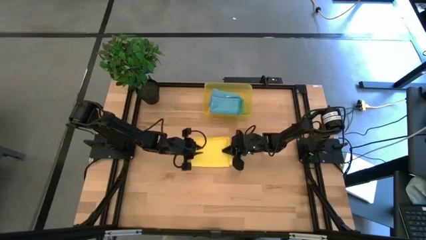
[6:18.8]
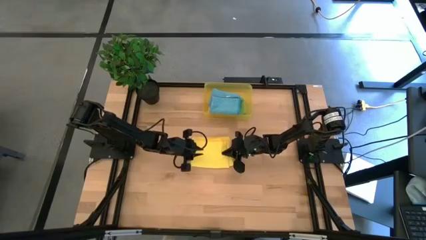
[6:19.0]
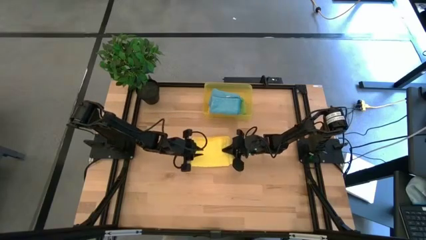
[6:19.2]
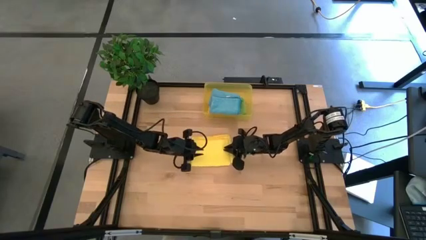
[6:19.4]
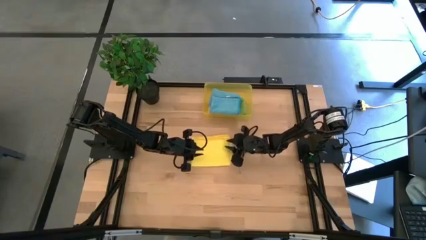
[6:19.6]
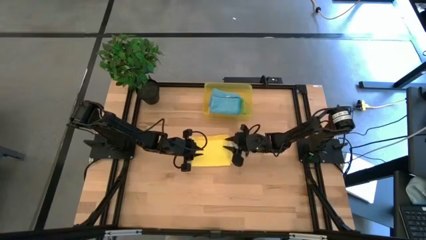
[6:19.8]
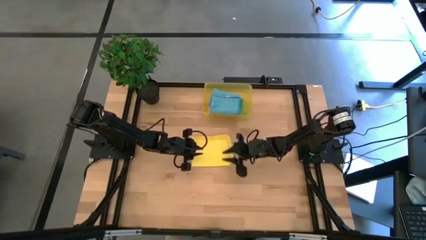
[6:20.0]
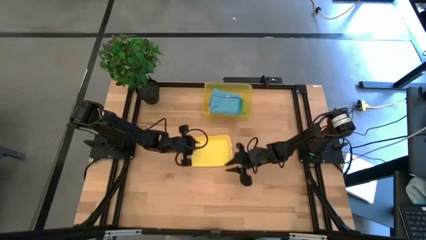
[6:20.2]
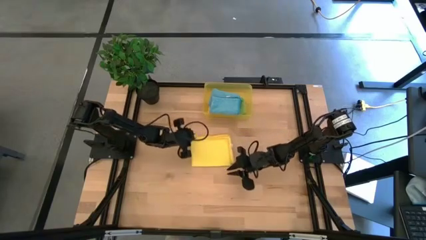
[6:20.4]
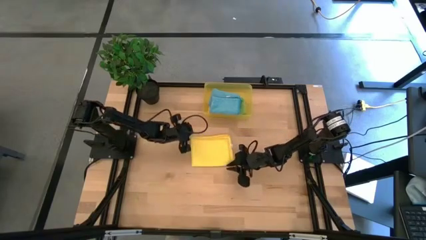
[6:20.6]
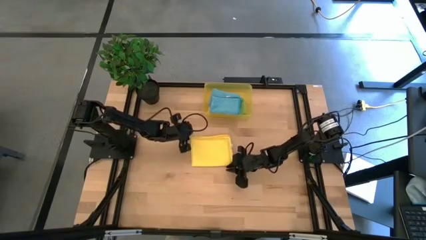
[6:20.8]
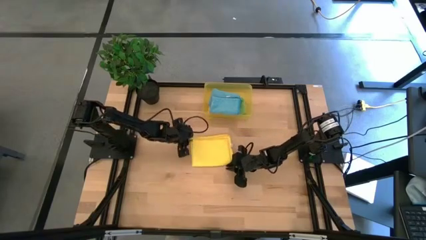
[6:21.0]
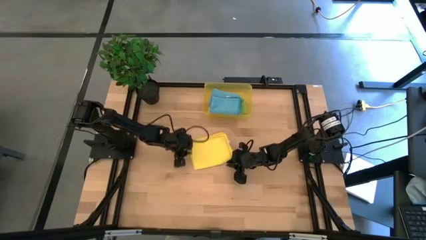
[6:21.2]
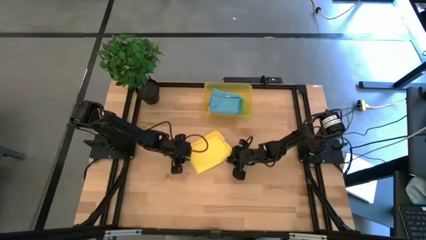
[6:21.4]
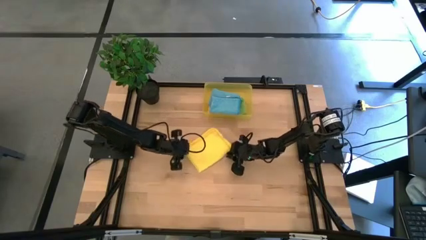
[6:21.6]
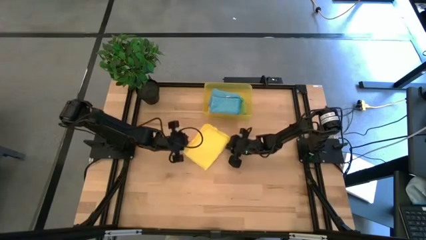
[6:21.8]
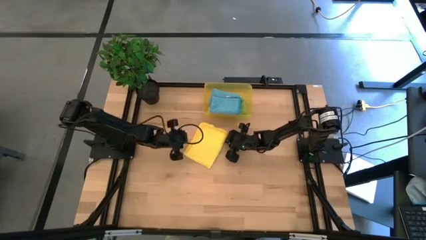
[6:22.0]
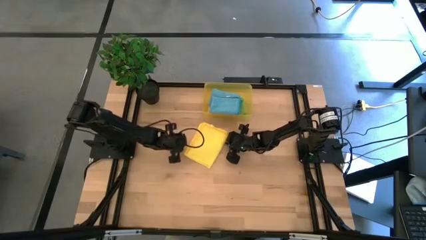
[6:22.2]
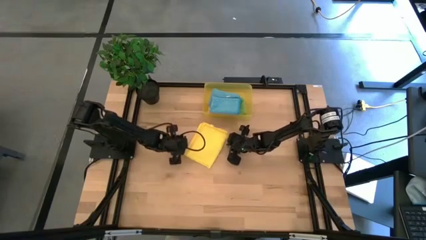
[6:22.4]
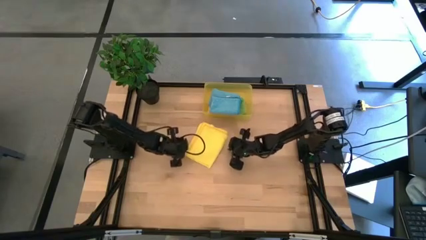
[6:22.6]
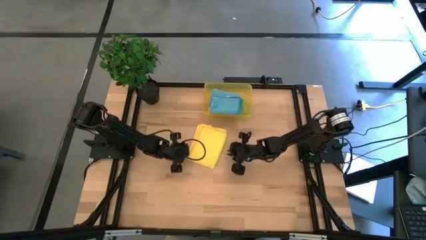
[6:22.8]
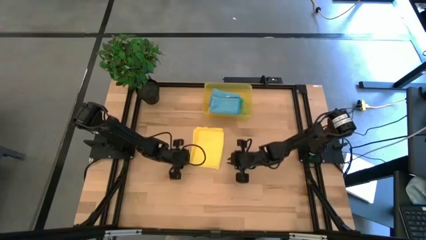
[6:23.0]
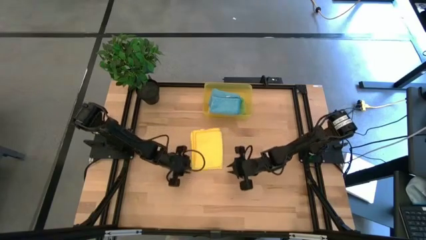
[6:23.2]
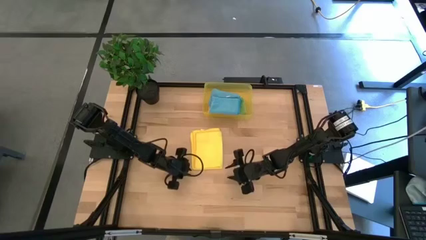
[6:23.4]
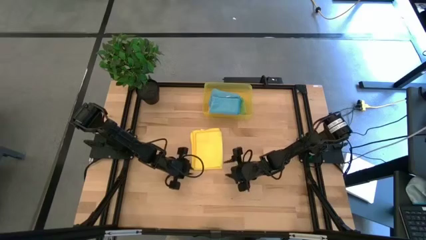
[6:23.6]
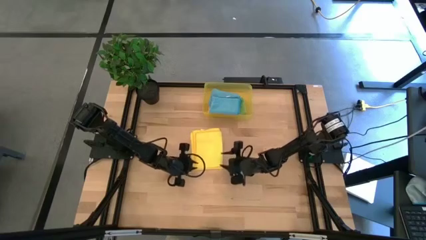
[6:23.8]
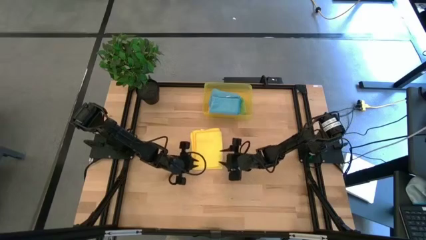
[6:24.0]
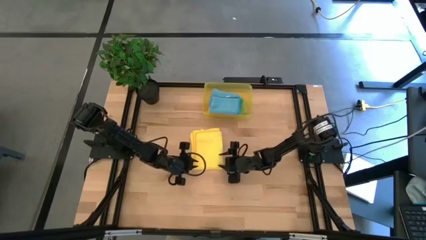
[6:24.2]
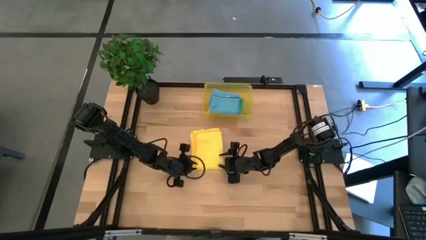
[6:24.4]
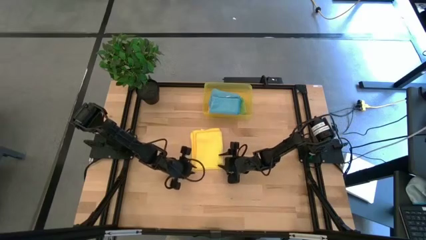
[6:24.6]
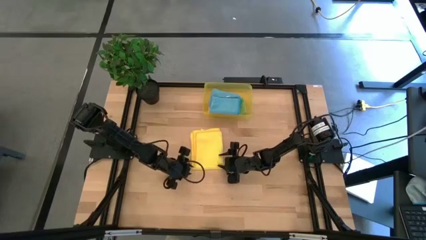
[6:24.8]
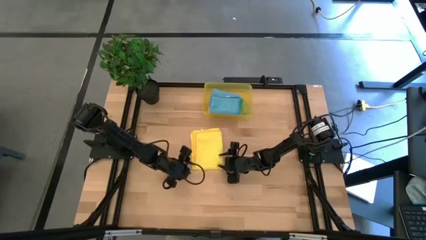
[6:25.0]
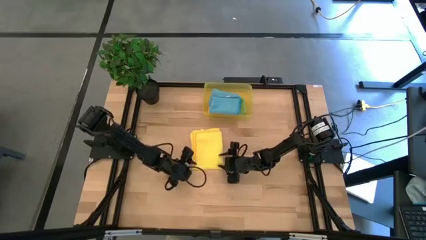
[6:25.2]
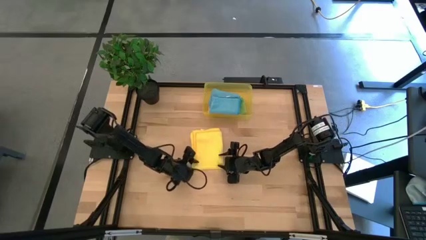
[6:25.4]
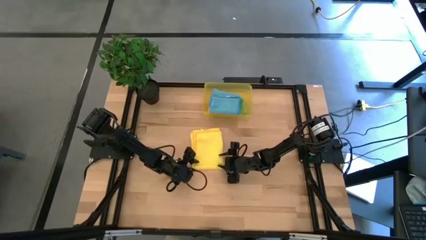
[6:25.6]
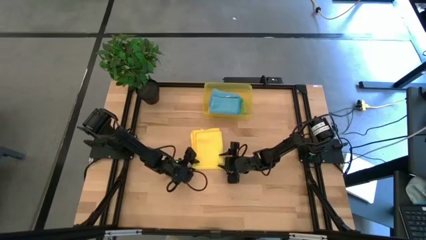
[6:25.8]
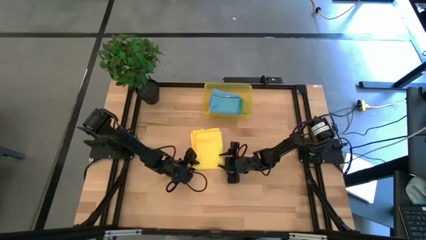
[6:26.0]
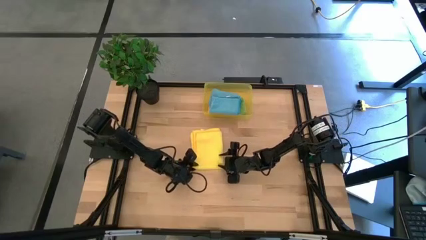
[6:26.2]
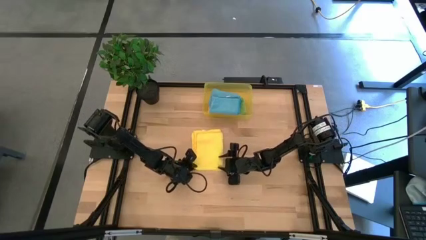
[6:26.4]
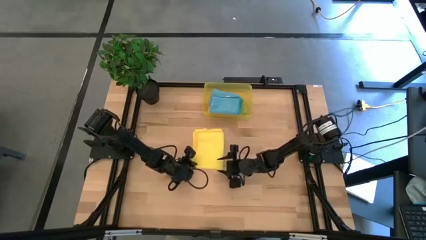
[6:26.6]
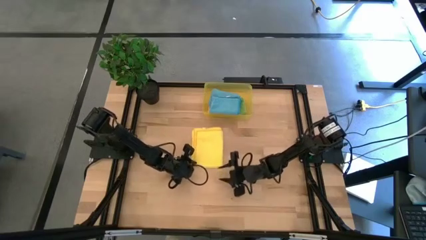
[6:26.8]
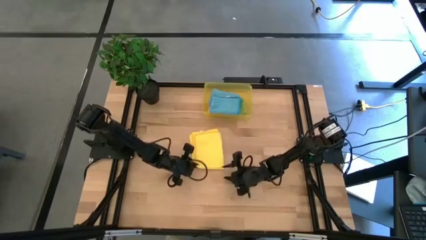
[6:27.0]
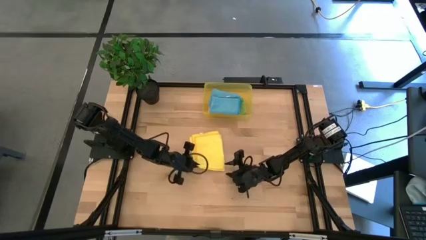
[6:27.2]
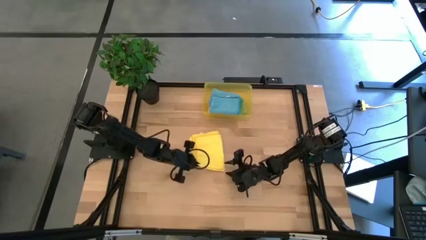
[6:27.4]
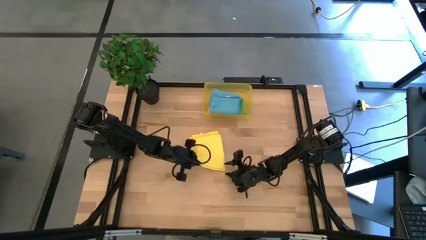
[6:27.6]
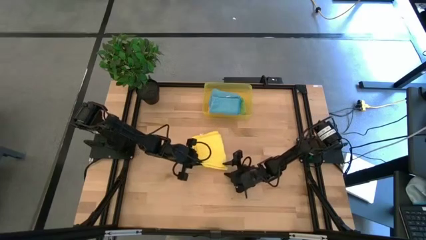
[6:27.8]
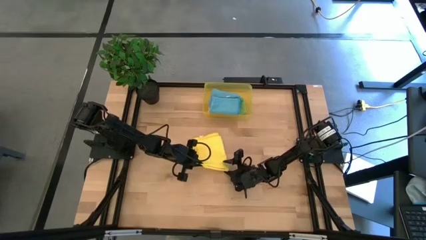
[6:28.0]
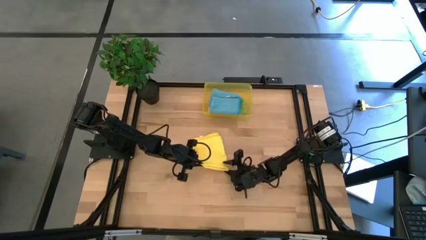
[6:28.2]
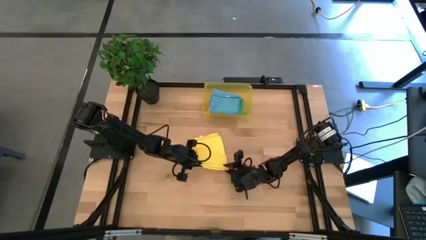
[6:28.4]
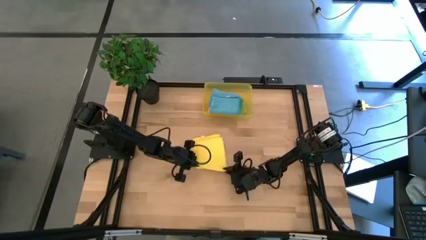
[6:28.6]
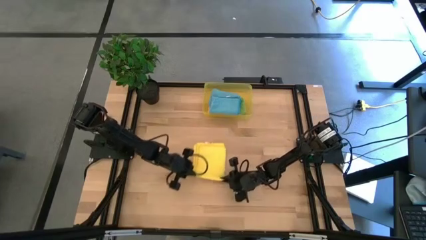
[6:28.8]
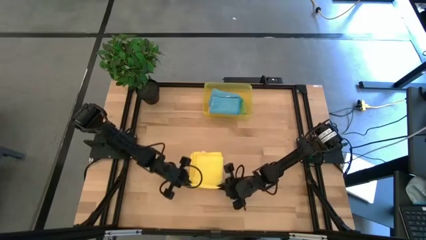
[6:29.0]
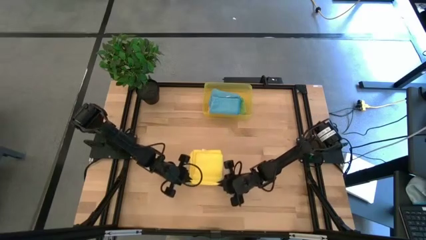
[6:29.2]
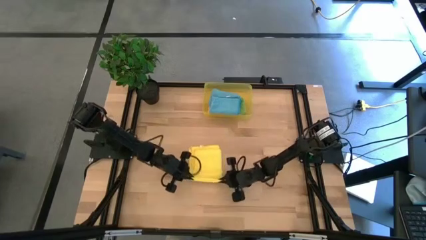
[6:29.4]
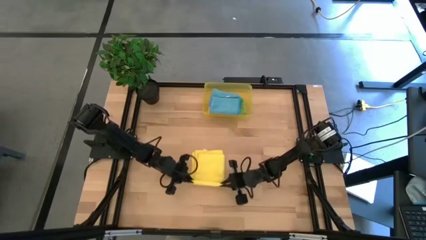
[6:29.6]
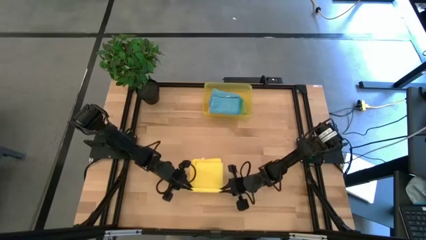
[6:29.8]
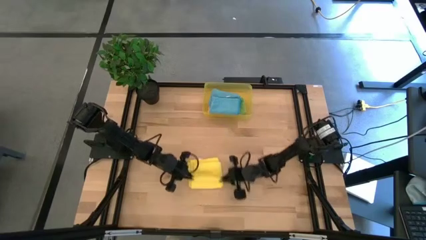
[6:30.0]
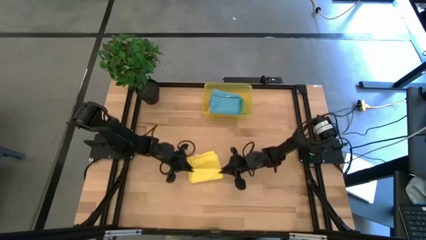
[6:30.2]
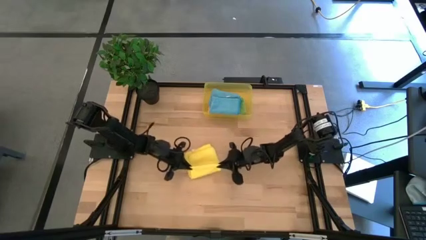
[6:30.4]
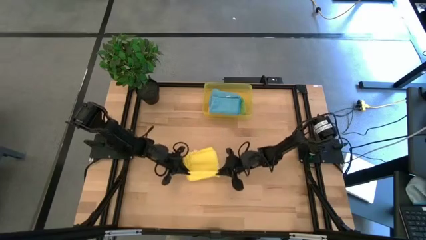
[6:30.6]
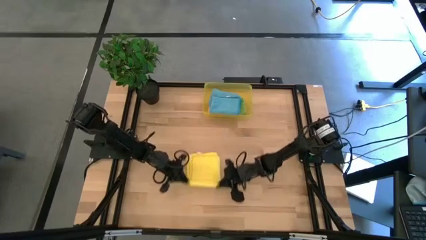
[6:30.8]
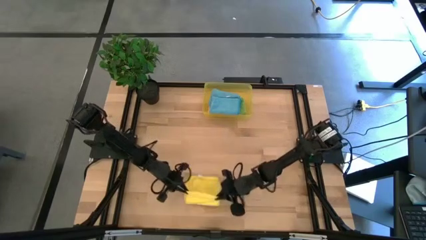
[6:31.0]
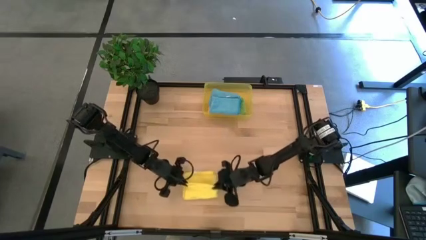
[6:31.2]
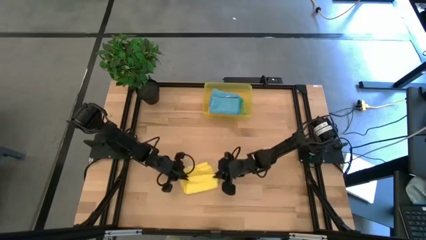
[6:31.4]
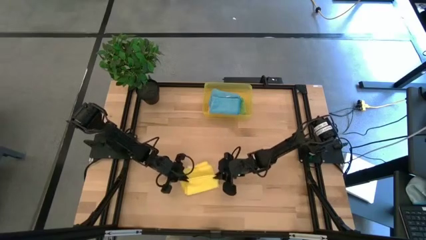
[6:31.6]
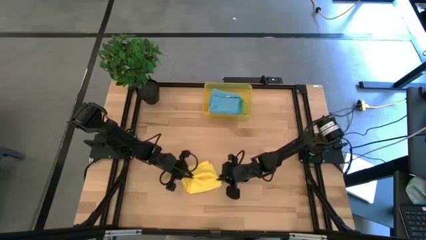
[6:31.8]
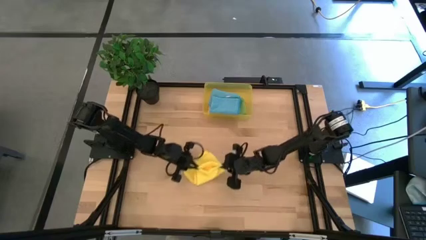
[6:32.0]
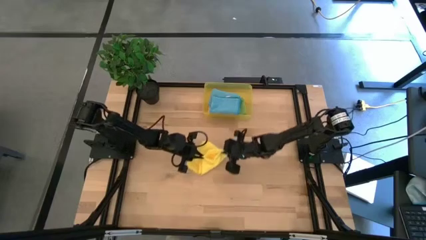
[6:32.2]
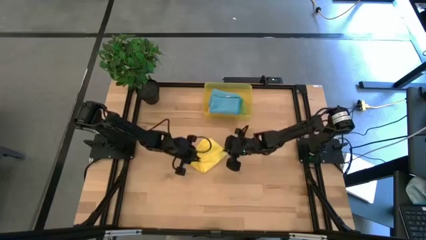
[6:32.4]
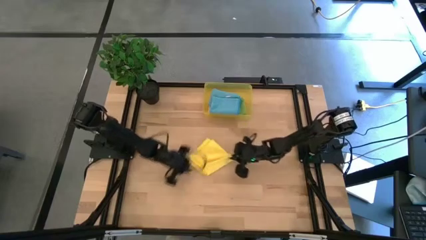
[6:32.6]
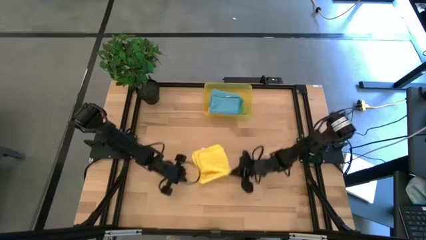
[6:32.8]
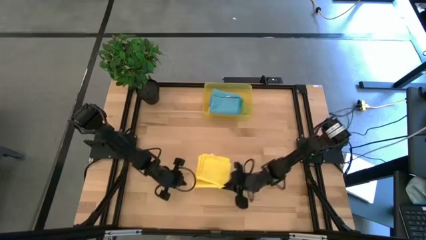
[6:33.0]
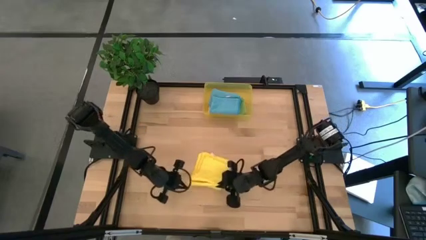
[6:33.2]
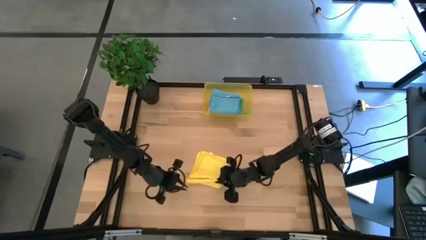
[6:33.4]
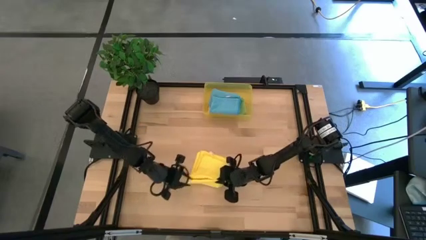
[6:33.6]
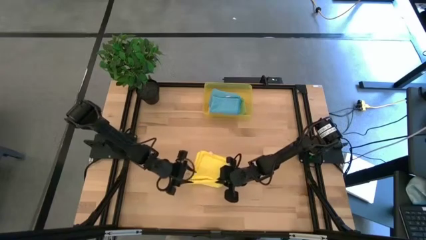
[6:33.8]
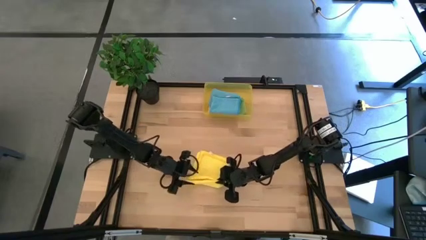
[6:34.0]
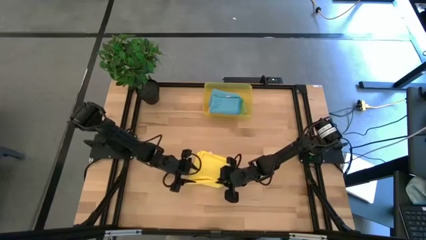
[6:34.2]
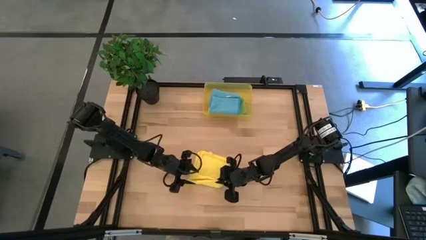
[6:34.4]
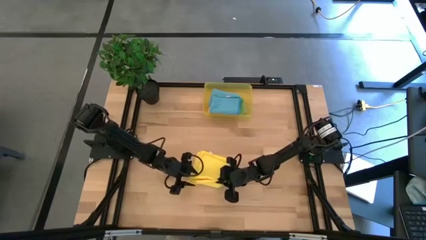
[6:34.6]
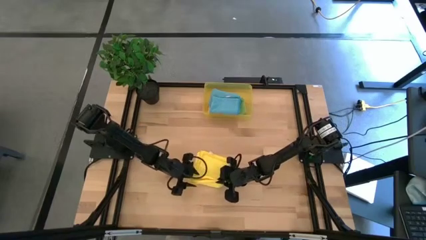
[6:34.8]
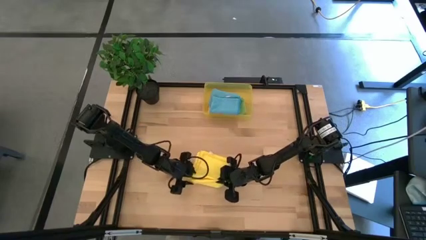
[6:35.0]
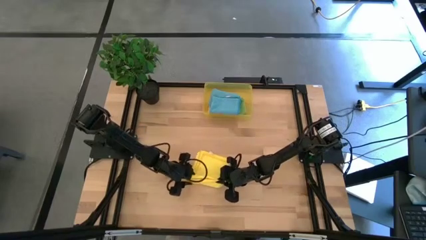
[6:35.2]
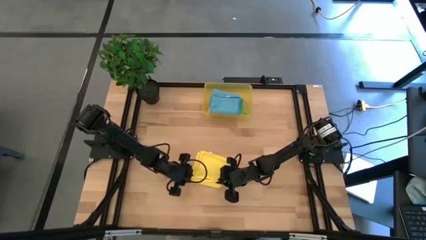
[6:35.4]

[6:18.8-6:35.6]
Task: Fold microfiber towels
Fold the yellow microfiber cloth
